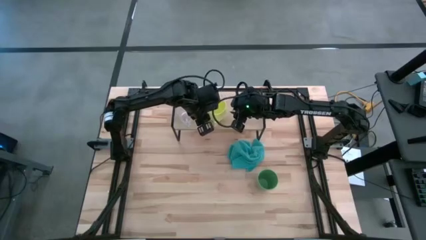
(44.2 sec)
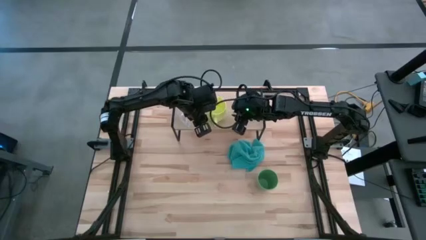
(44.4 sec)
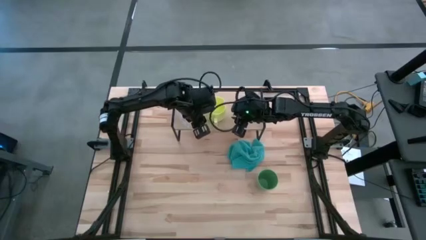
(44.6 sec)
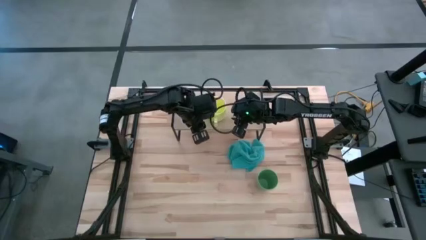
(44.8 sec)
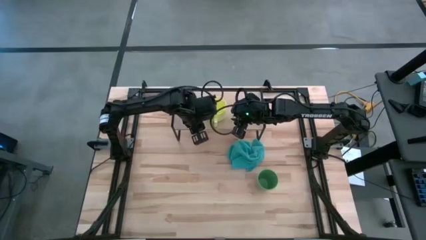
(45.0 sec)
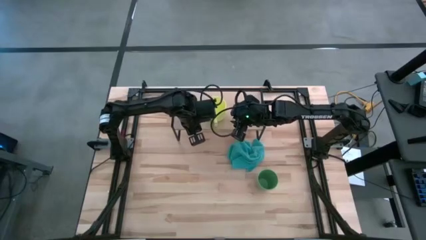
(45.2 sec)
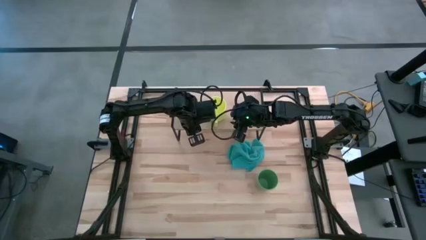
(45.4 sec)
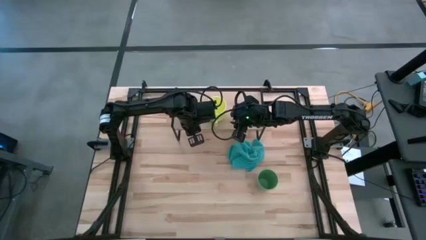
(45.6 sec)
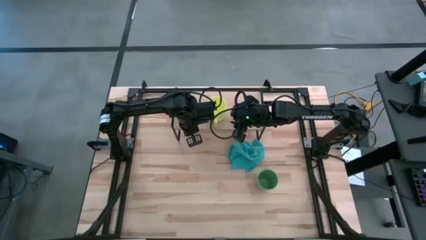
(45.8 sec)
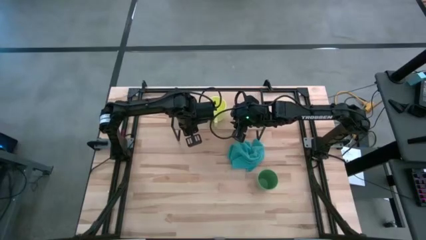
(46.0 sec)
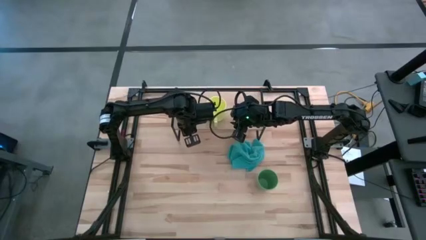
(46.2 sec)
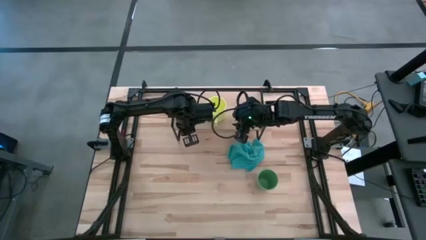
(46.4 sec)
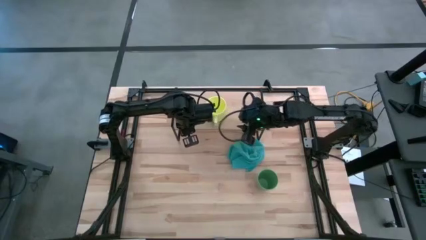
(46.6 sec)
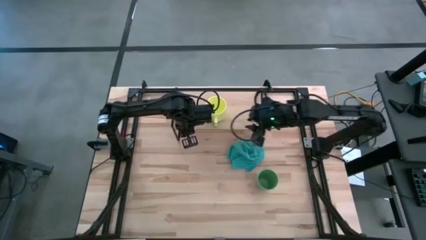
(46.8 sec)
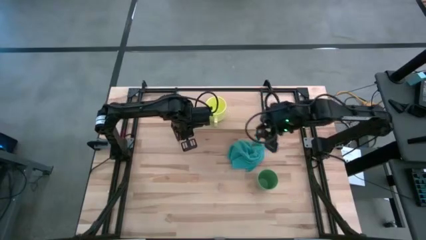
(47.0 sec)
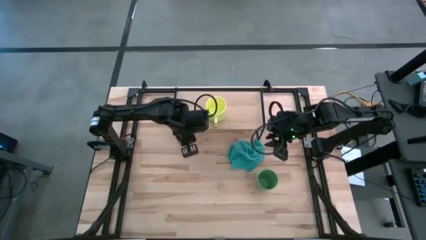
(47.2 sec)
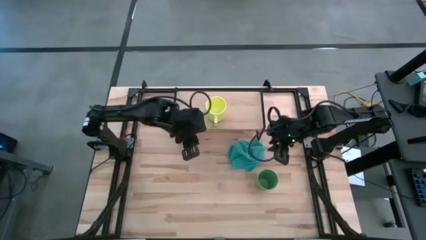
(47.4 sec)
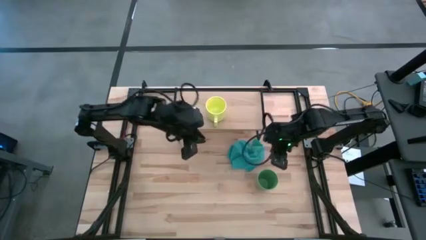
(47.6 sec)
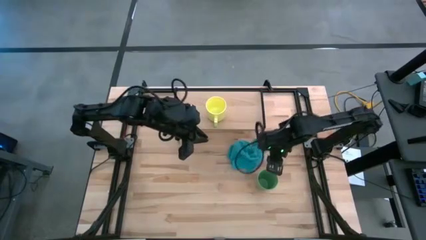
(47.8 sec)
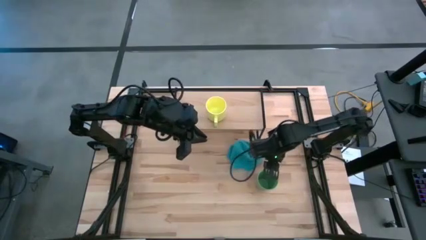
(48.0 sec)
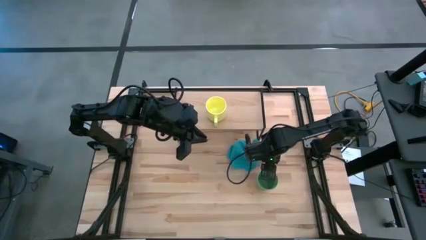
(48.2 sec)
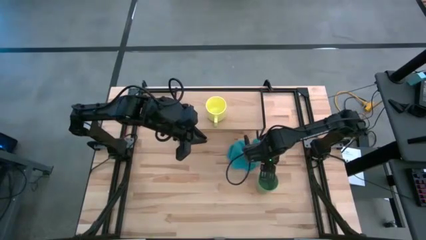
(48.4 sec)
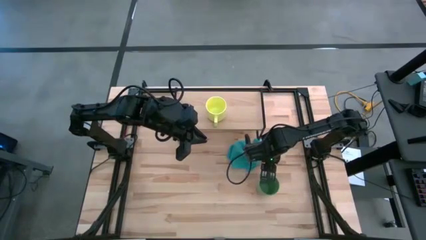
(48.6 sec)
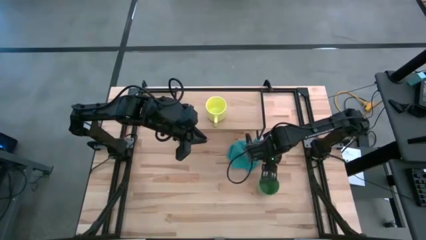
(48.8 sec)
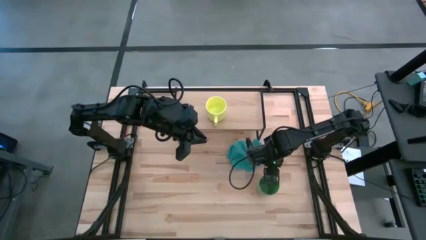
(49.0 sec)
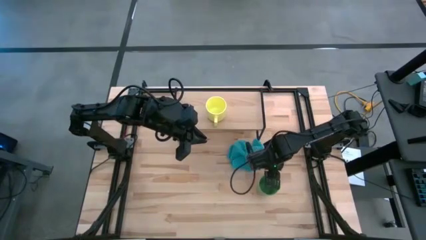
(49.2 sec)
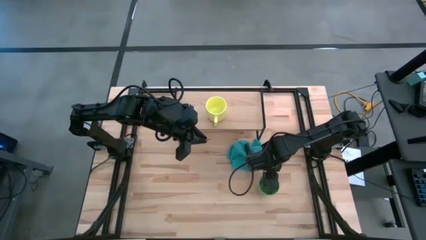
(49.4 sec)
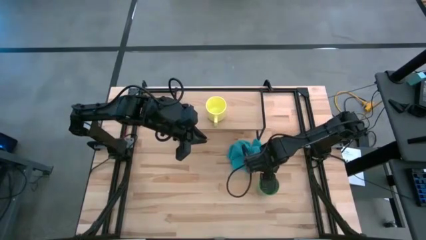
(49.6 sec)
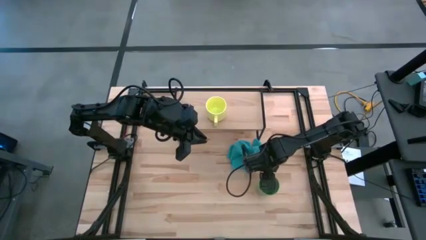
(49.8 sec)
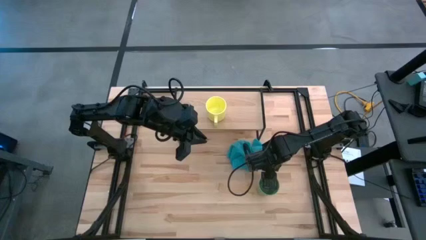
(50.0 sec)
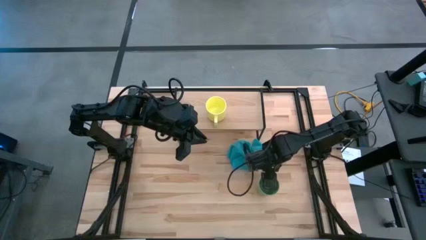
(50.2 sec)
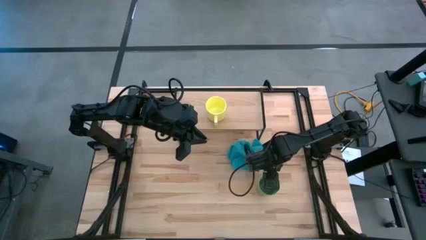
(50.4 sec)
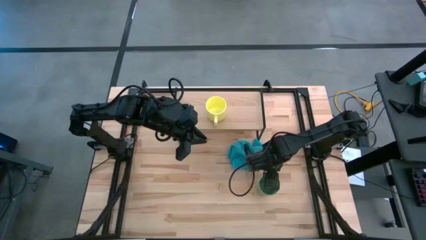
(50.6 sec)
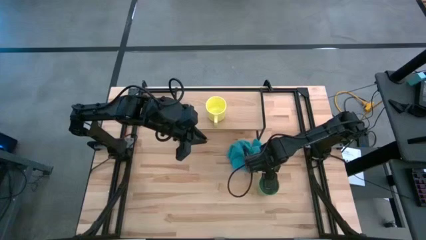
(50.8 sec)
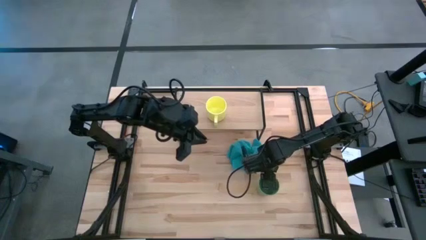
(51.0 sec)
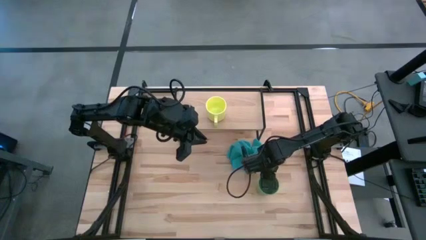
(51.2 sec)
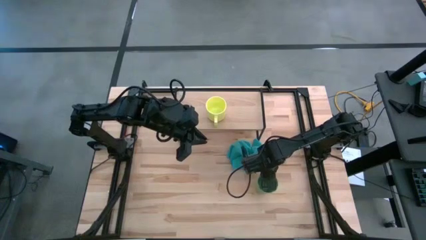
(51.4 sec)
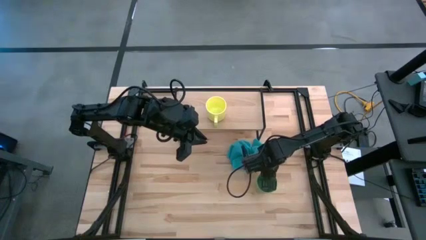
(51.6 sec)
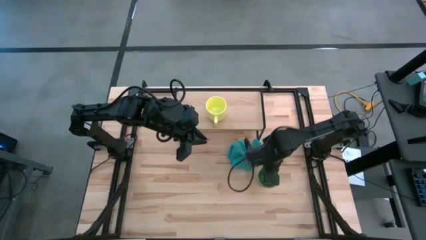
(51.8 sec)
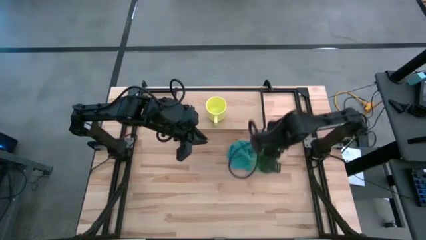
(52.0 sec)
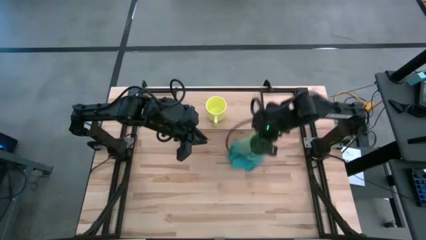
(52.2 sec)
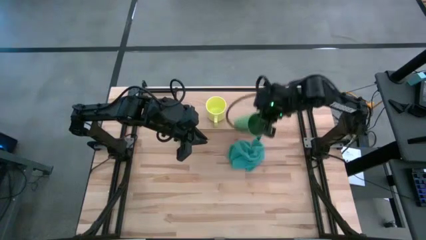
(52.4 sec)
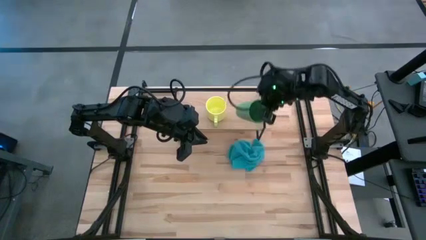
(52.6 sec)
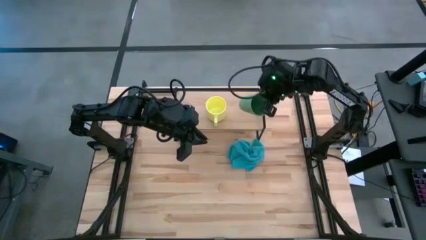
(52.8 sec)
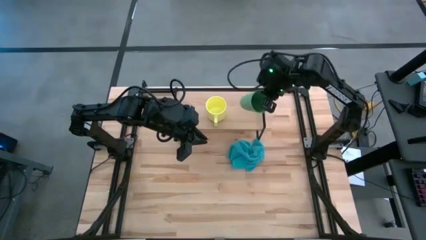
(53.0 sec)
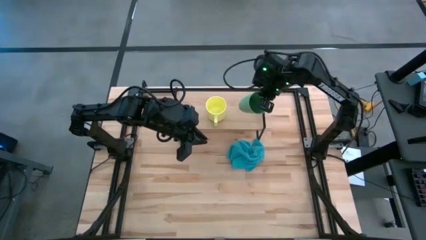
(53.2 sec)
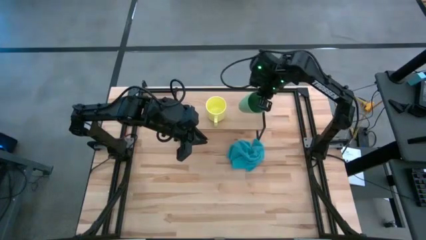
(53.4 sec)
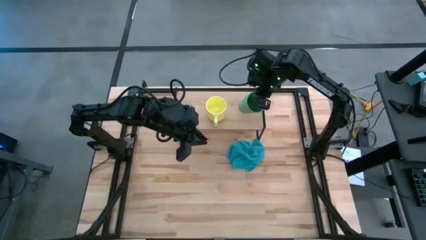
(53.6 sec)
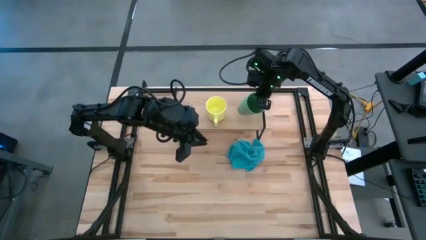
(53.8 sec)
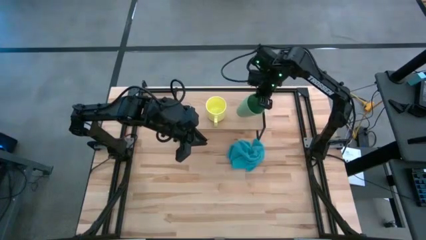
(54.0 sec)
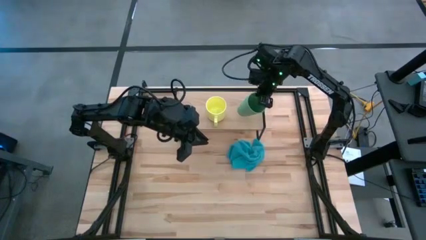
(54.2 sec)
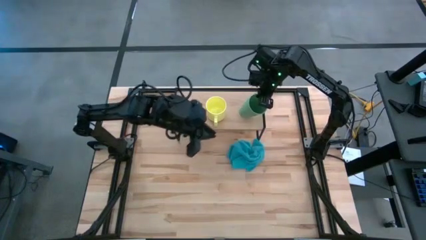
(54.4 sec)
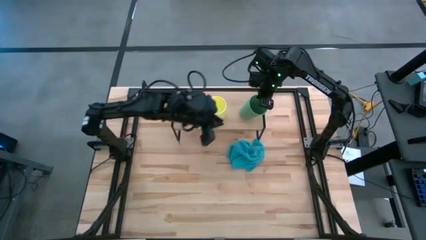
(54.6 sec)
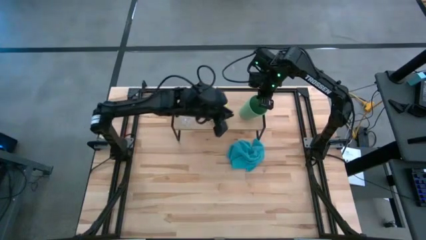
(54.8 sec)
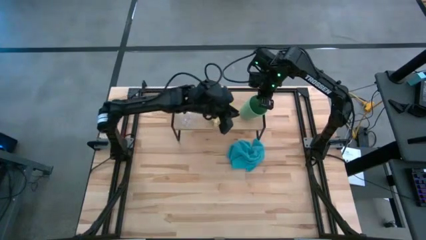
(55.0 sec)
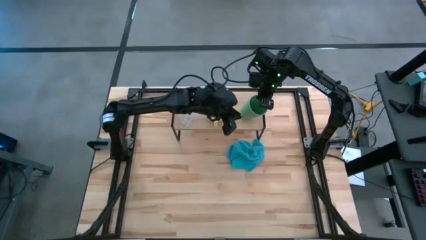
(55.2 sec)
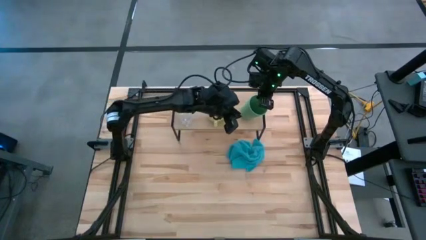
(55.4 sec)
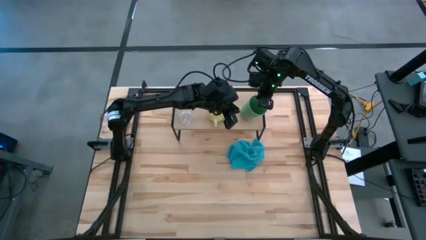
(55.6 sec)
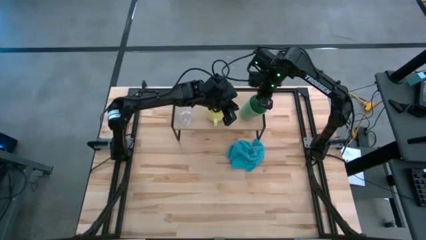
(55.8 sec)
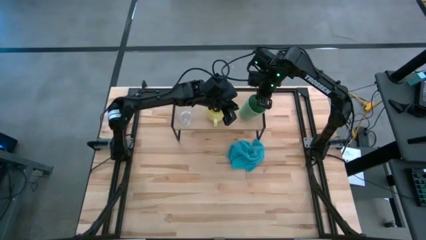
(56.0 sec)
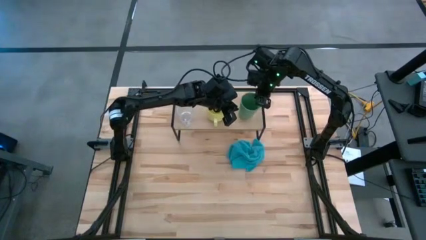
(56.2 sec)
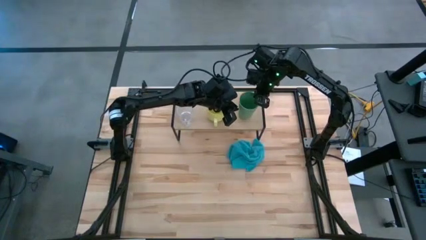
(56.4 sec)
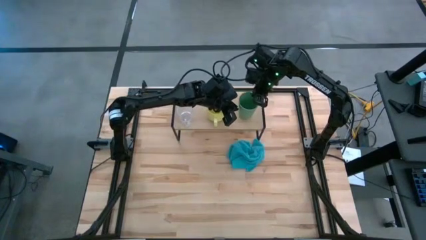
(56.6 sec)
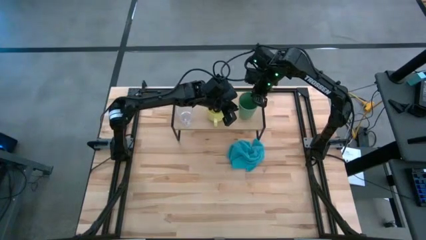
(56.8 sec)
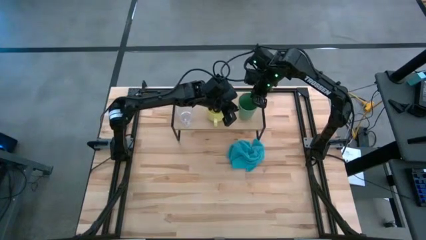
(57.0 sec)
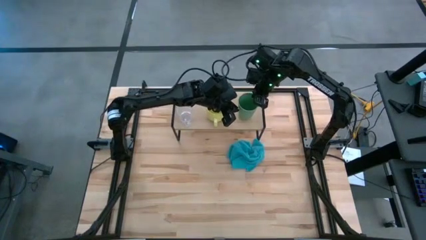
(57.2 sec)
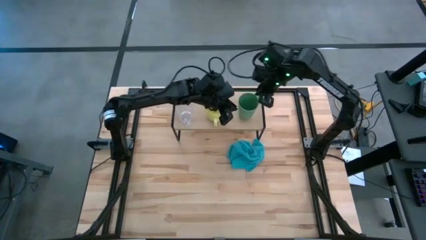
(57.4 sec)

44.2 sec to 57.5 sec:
Task: Stack small to large cups/mugs on shelf
Put the green cup on the shelf
